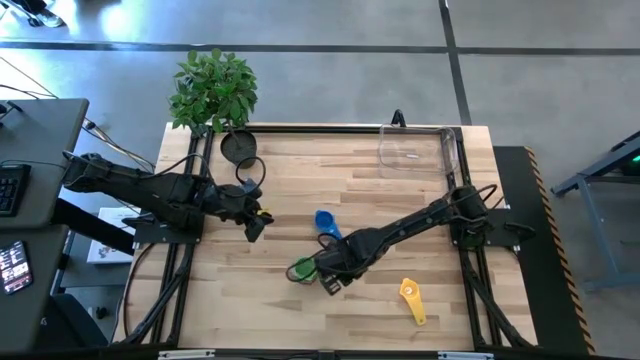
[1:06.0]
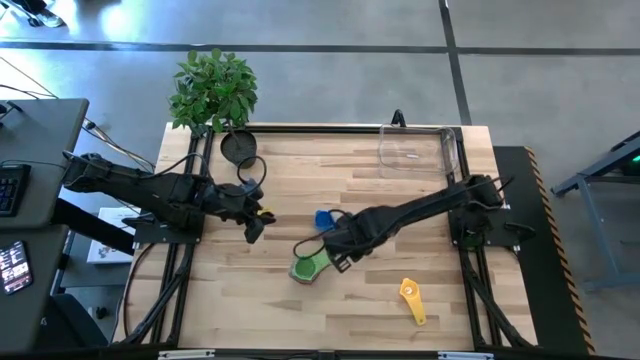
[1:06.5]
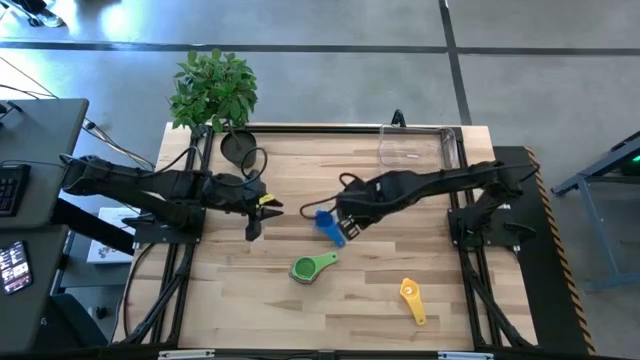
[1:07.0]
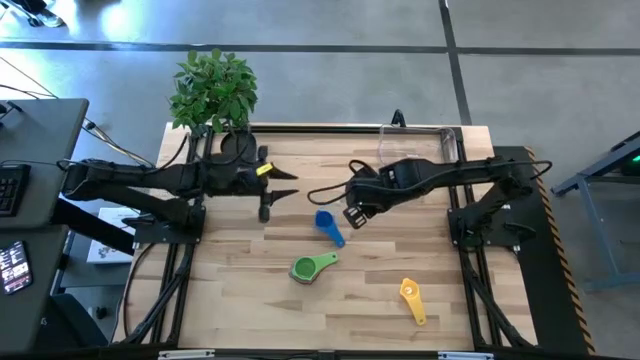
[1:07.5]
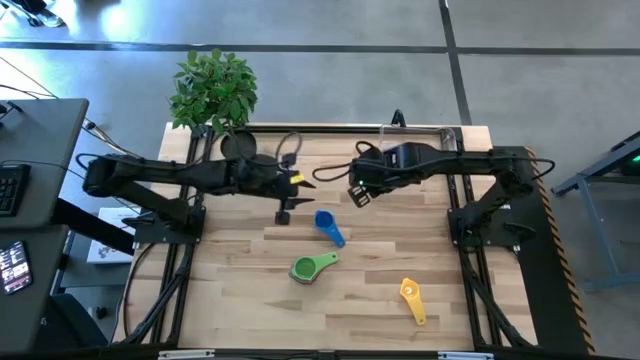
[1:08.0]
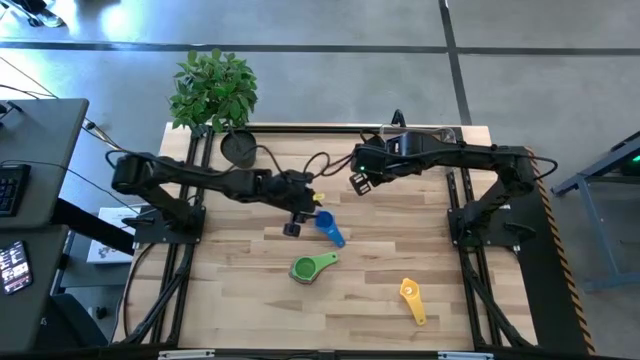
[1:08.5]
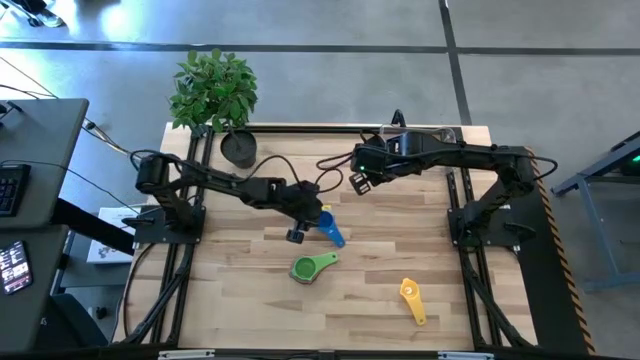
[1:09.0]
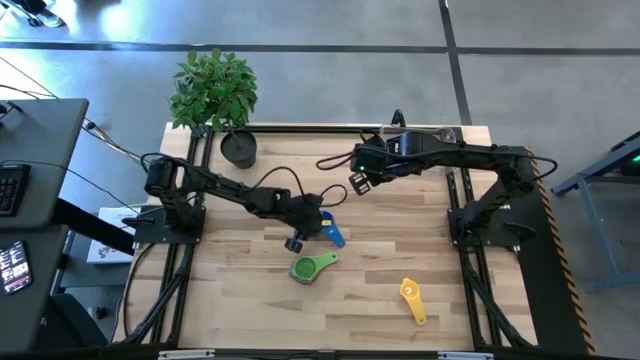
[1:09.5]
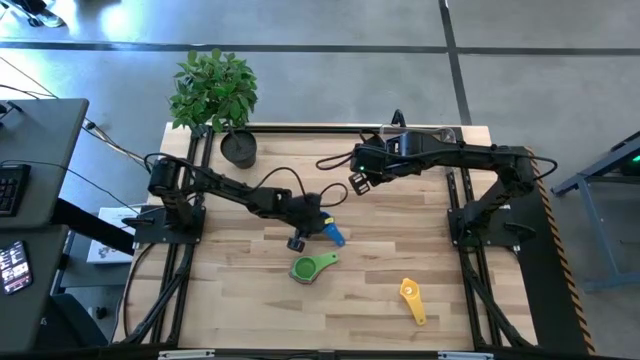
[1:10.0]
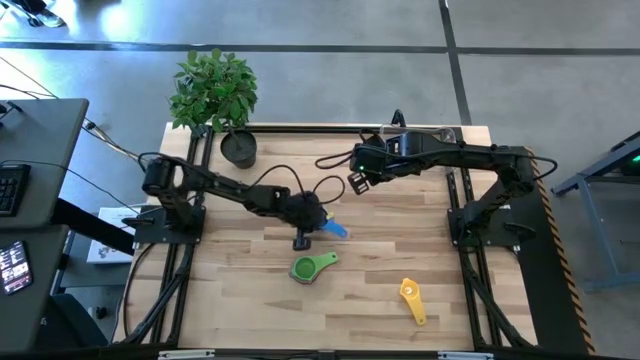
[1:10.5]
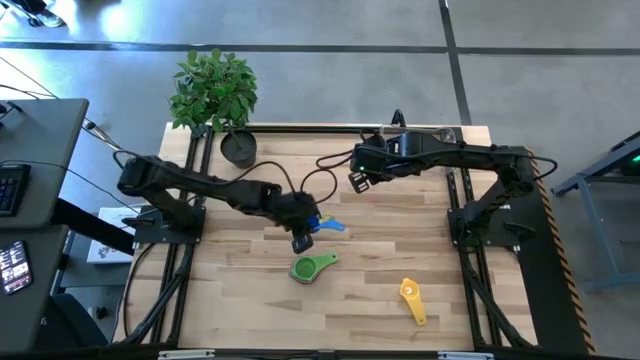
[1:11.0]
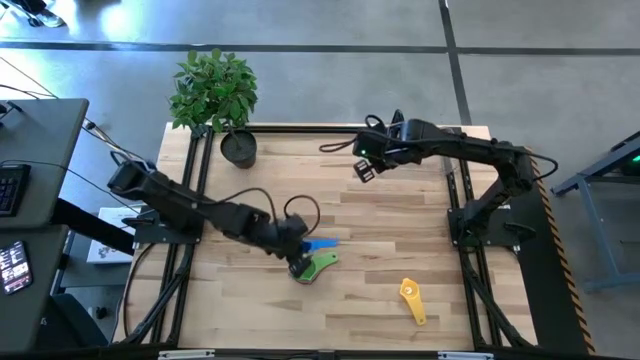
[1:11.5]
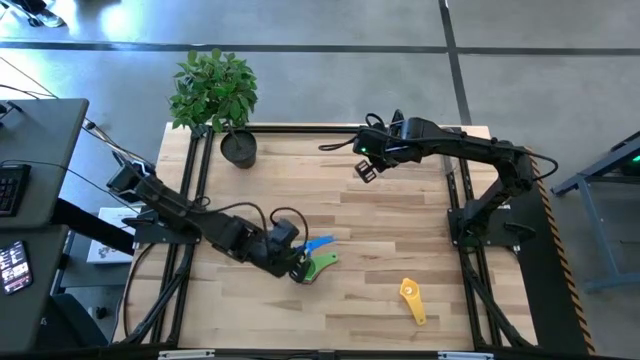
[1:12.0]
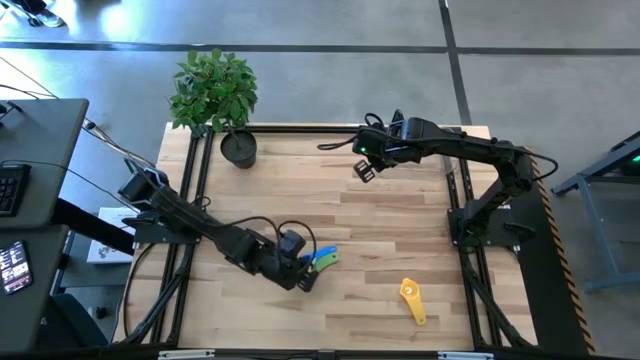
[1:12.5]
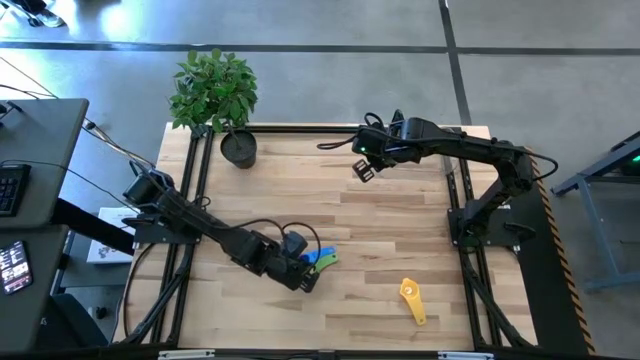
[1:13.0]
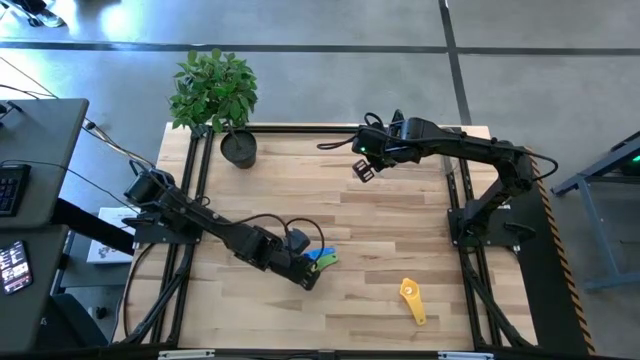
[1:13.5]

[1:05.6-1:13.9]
Task: Nest measuring cups in basket
Stack the blue measuring cup on top of the green measuring cup

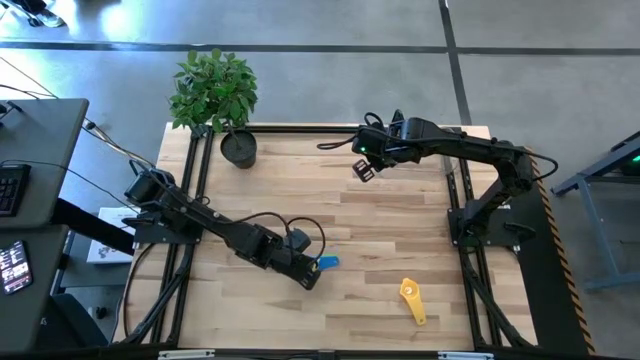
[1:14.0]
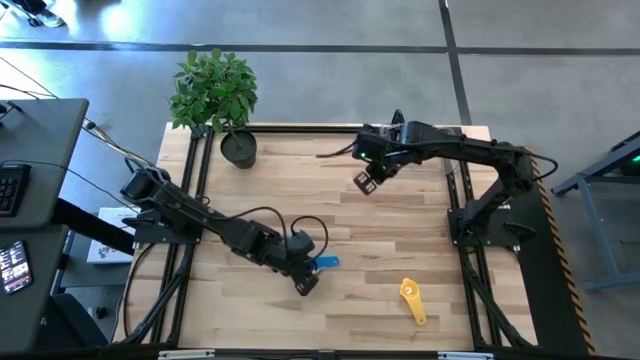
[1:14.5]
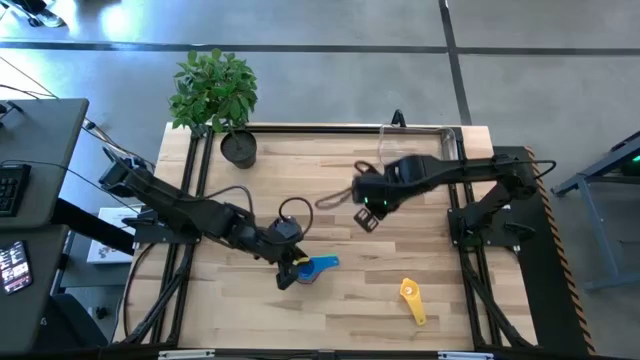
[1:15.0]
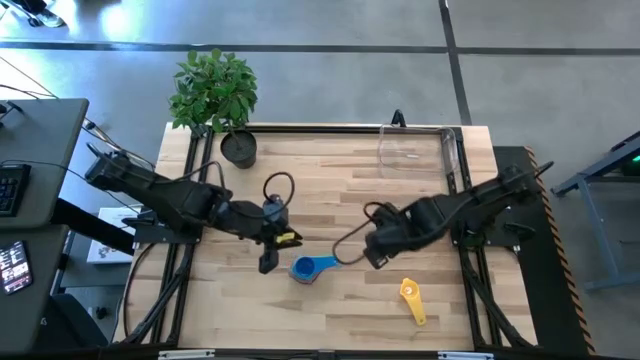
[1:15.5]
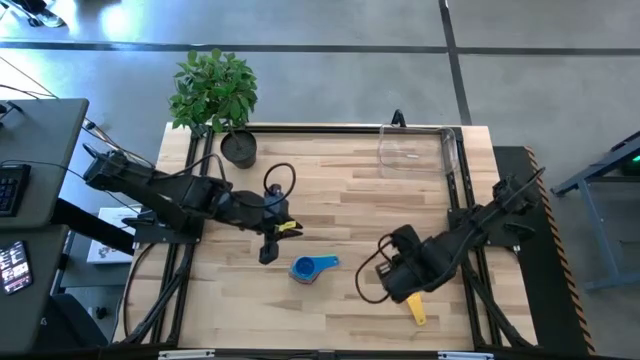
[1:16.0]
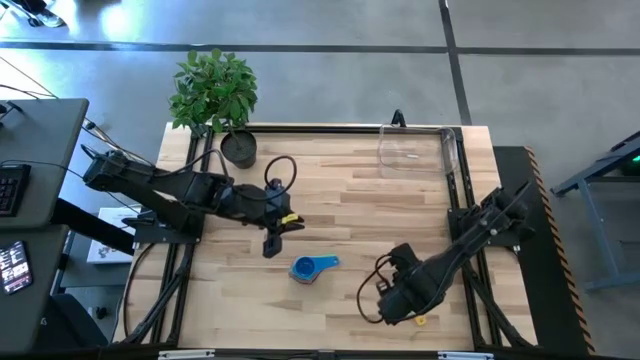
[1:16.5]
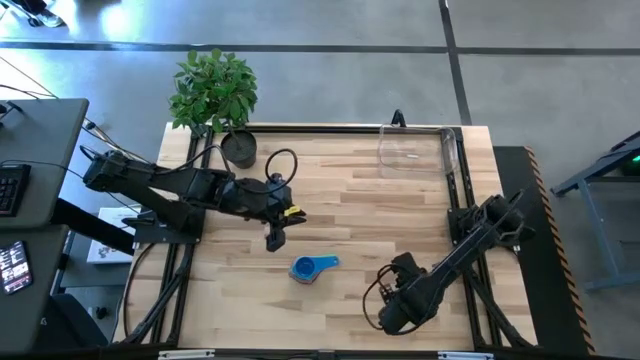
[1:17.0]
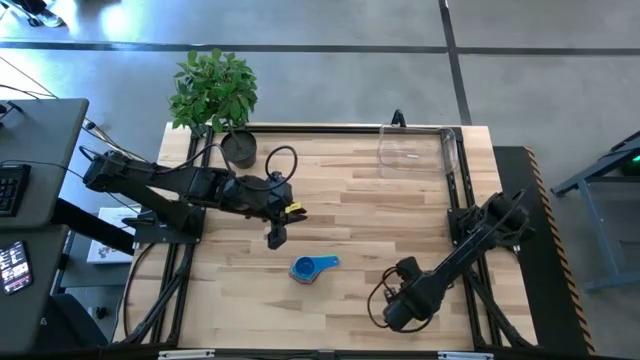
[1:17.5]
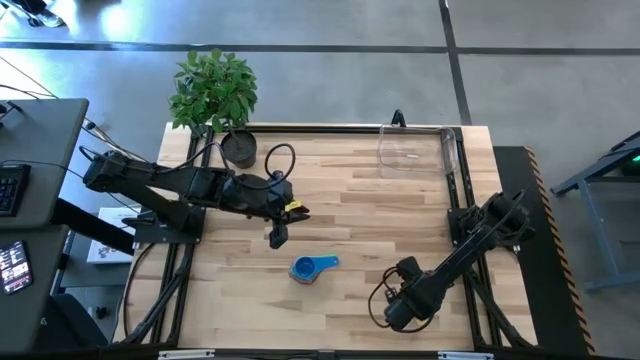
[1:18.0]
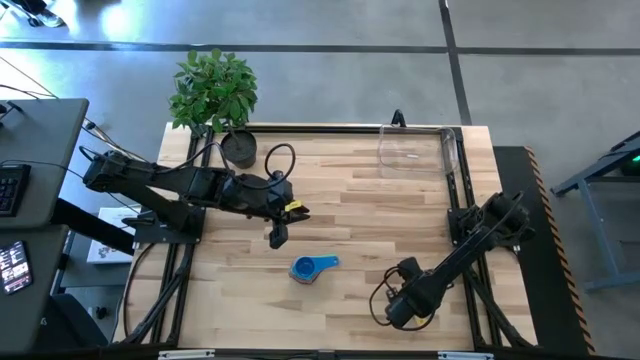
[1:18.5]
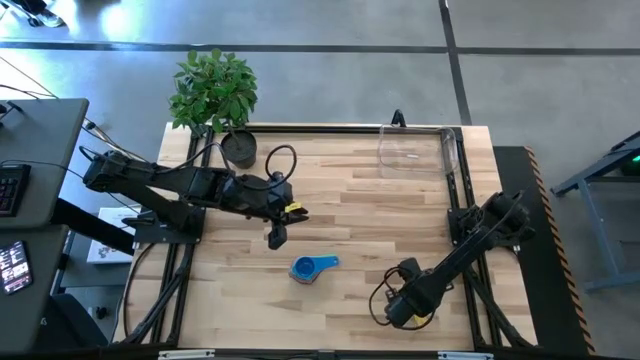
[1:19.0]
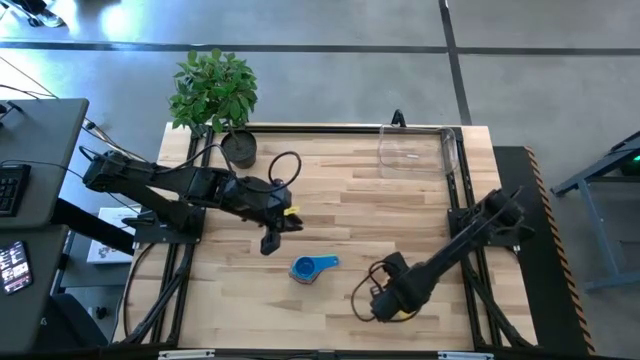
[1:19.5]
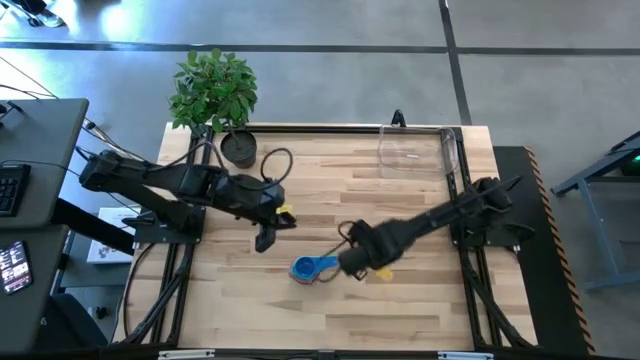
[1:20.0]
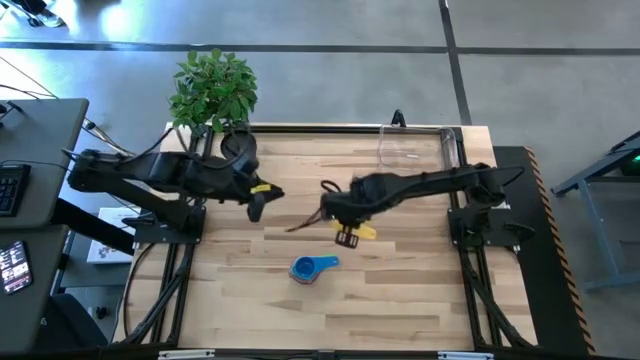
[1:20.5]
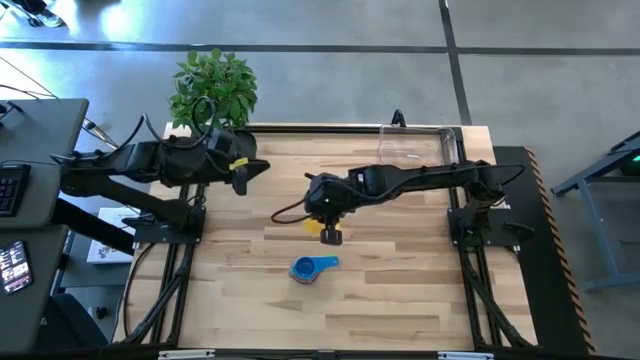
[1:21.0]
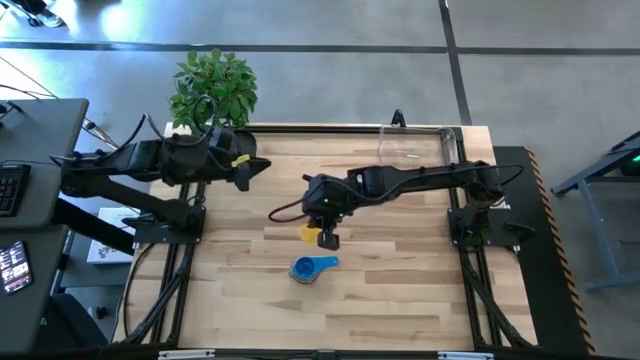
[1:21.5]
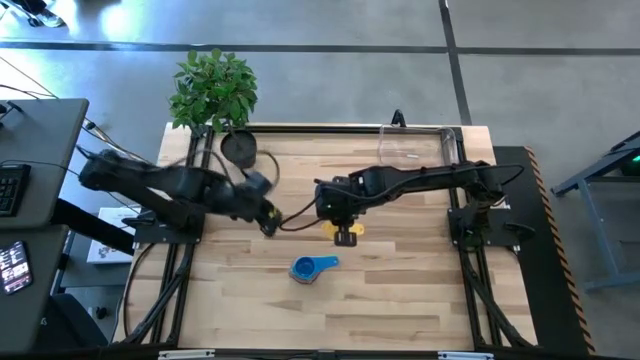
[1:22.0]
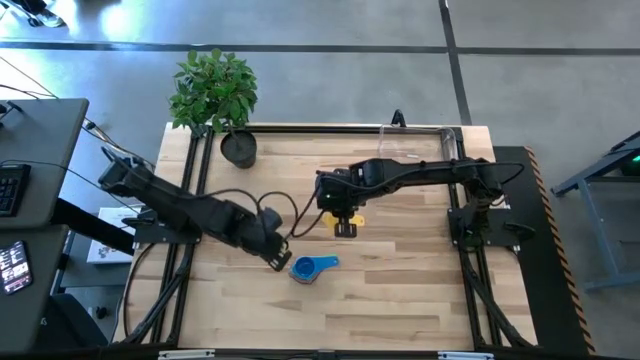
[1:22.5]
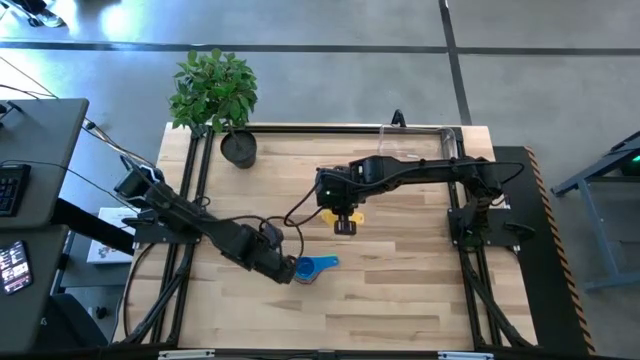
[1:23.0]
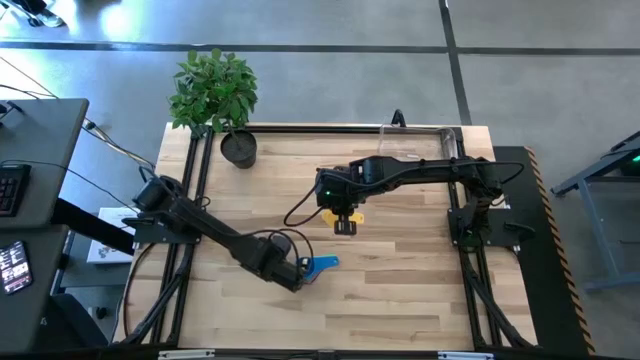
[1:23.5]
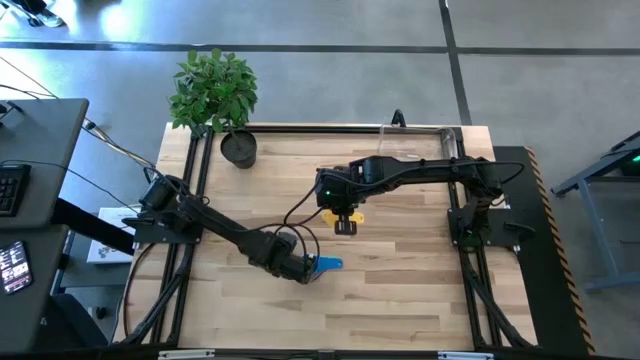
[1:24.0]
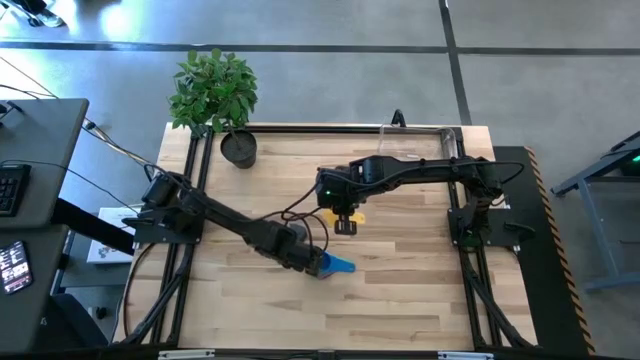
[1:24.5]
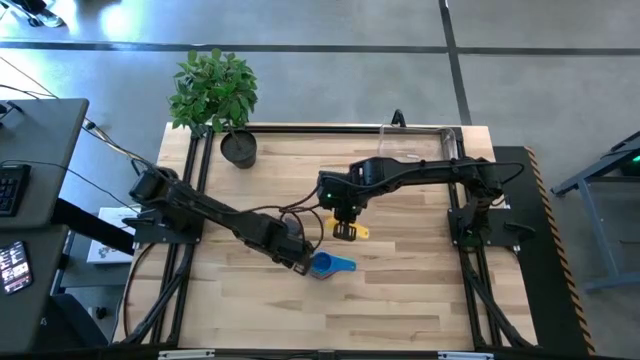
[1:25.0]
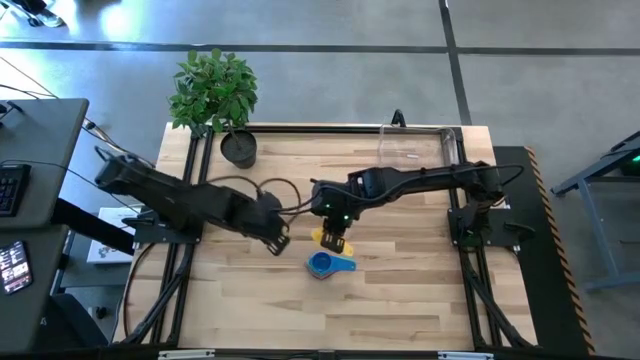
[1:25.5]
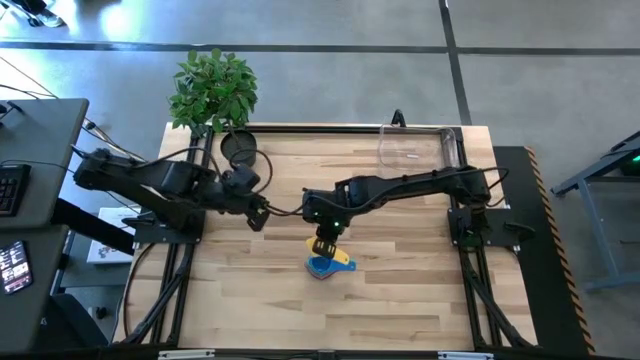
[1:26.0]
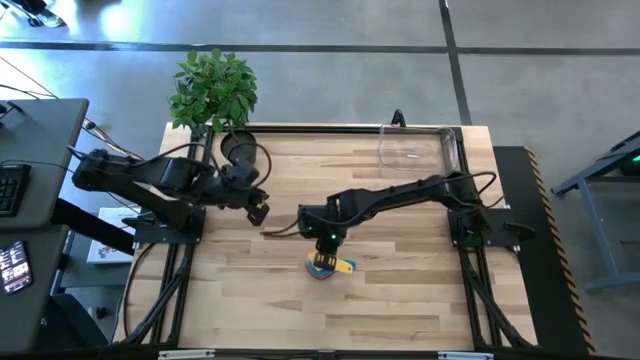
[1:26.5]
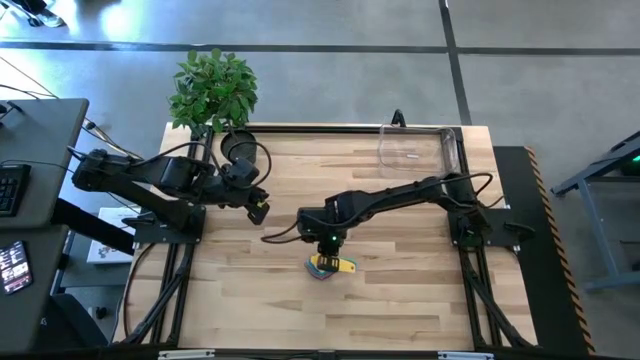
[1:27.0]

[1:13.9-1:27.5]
Stack the yellow measuring cup on top of the blue measuring cup
